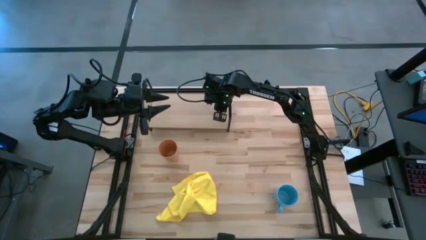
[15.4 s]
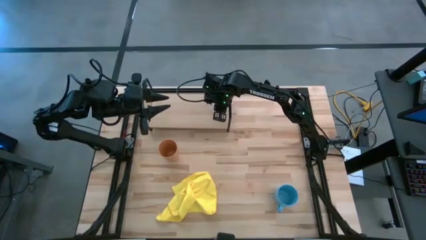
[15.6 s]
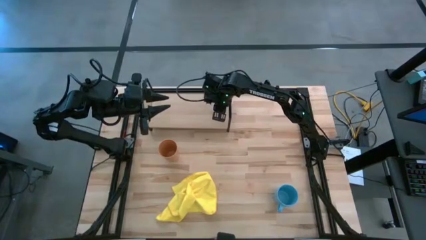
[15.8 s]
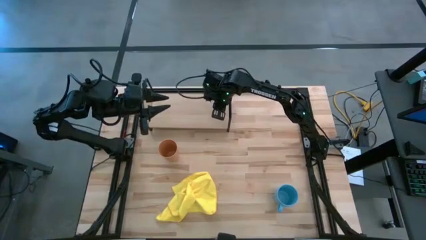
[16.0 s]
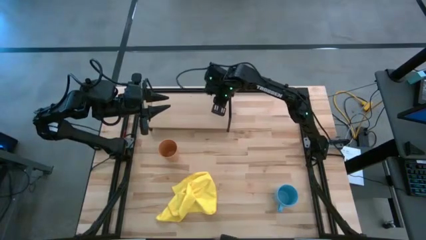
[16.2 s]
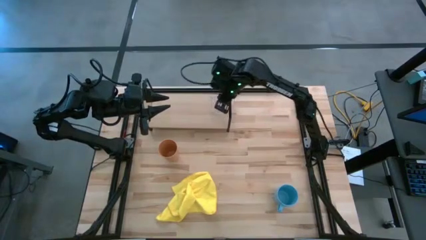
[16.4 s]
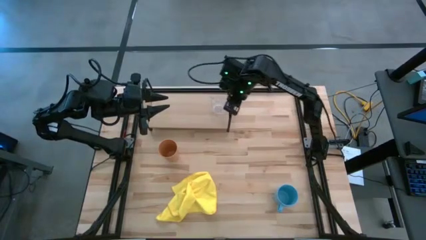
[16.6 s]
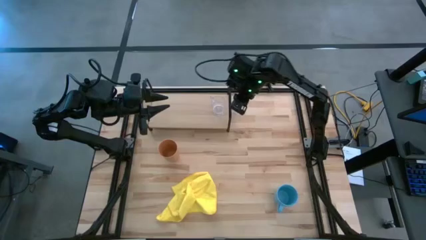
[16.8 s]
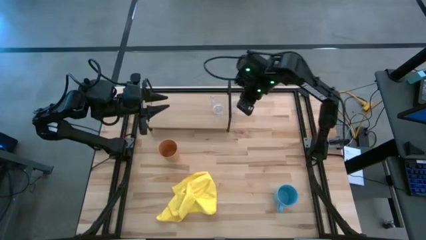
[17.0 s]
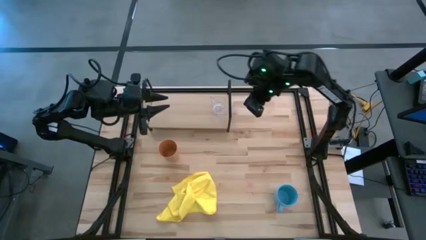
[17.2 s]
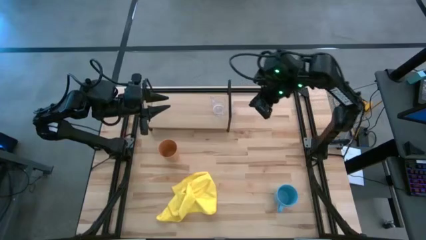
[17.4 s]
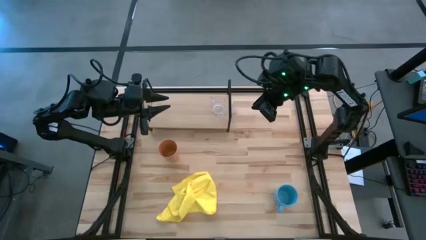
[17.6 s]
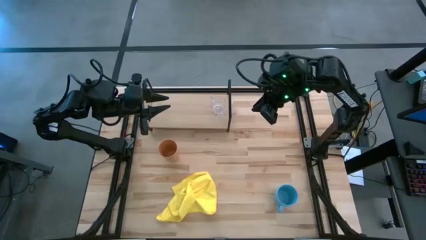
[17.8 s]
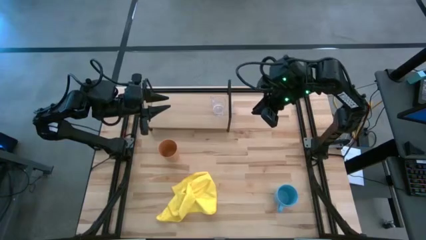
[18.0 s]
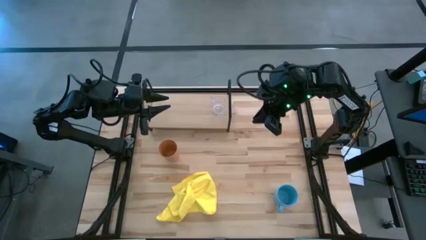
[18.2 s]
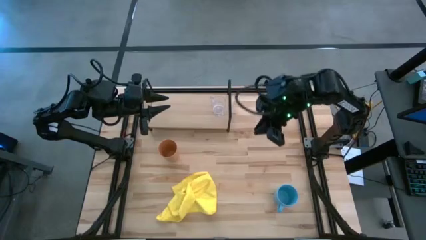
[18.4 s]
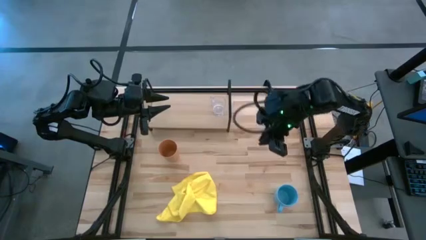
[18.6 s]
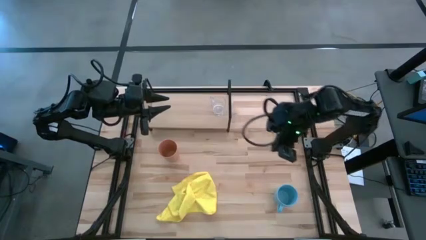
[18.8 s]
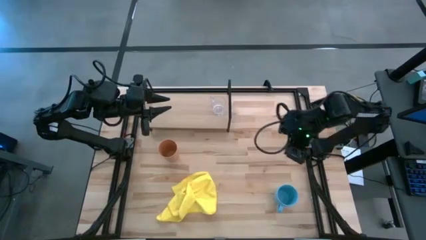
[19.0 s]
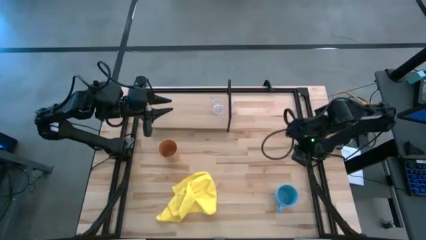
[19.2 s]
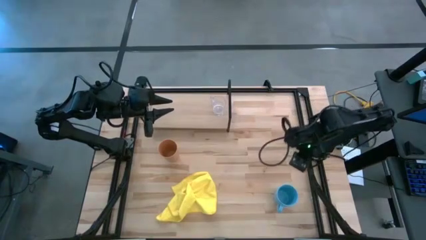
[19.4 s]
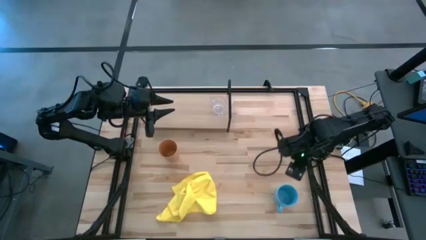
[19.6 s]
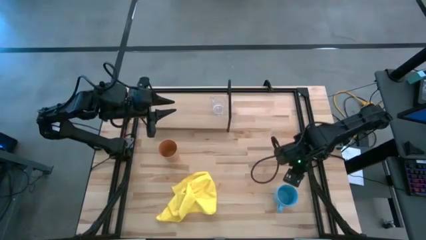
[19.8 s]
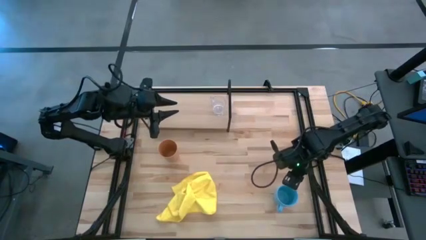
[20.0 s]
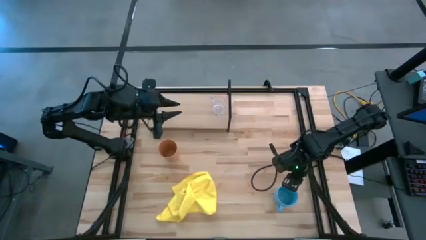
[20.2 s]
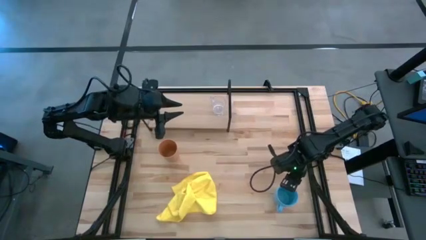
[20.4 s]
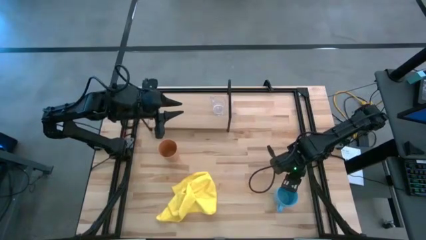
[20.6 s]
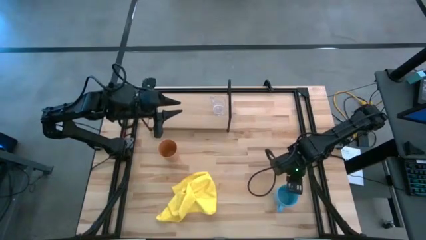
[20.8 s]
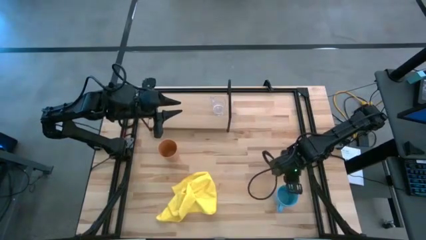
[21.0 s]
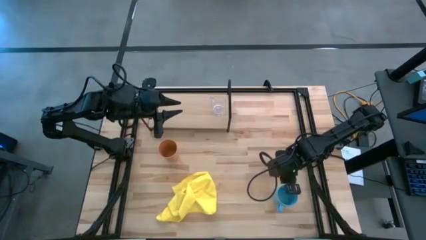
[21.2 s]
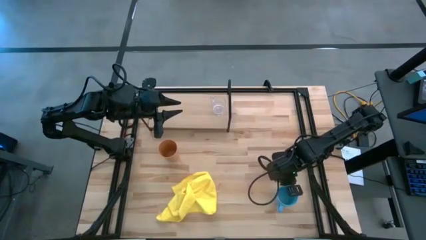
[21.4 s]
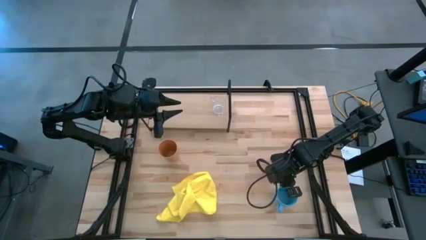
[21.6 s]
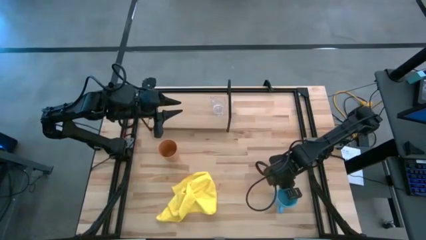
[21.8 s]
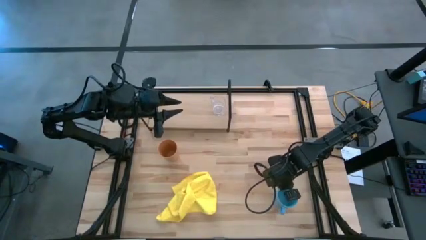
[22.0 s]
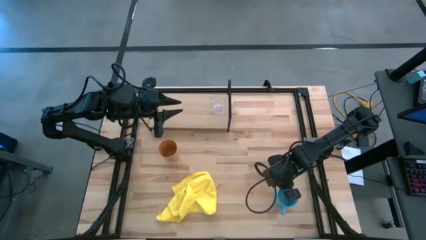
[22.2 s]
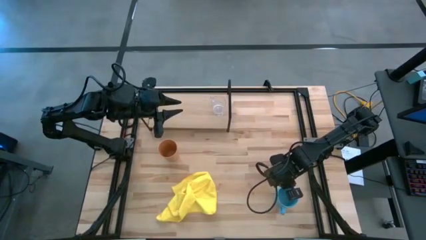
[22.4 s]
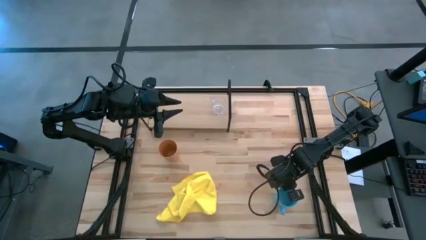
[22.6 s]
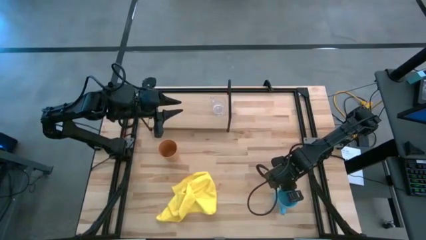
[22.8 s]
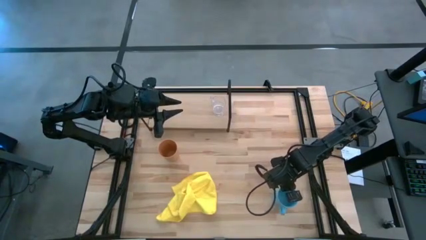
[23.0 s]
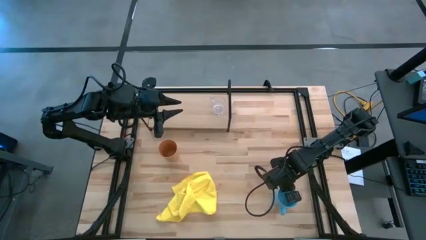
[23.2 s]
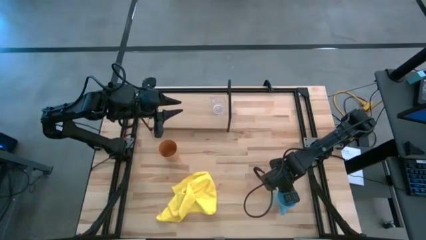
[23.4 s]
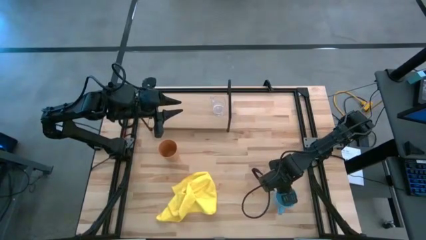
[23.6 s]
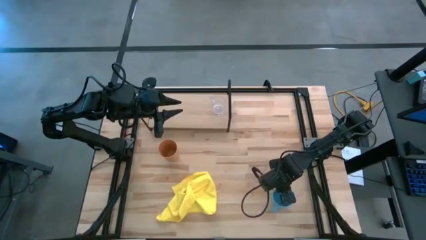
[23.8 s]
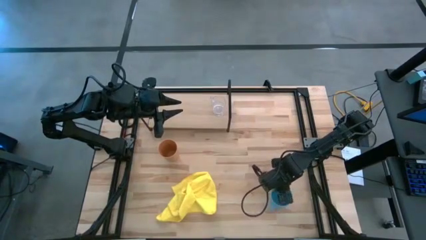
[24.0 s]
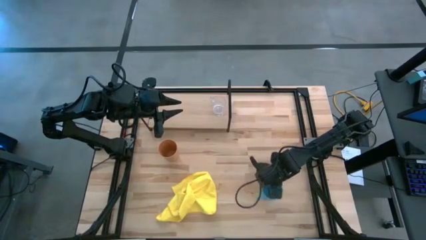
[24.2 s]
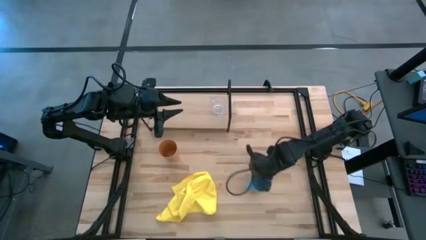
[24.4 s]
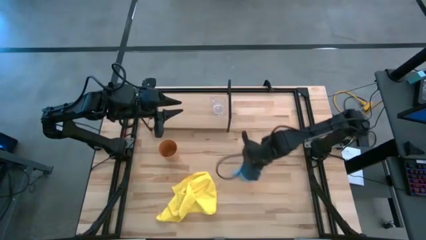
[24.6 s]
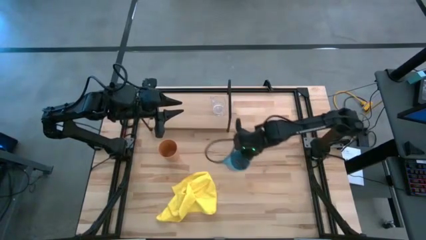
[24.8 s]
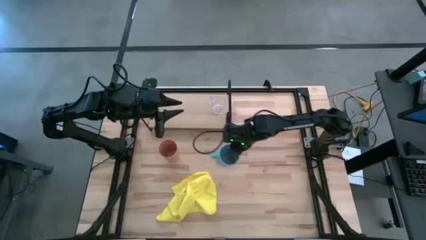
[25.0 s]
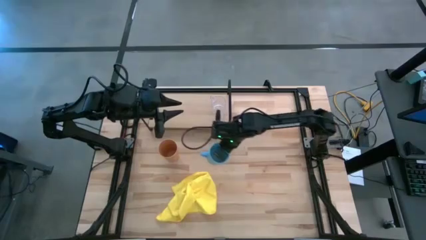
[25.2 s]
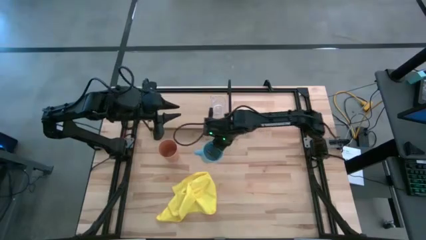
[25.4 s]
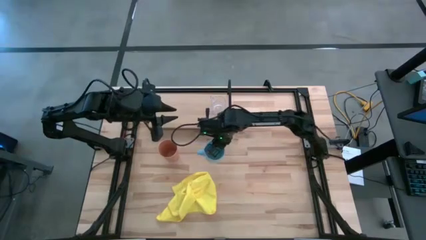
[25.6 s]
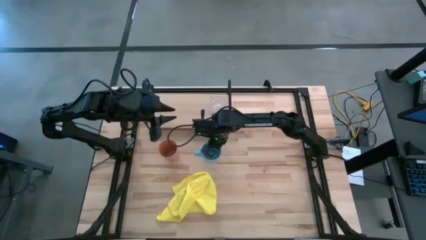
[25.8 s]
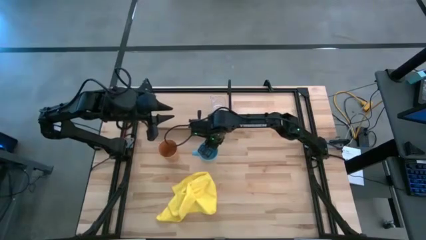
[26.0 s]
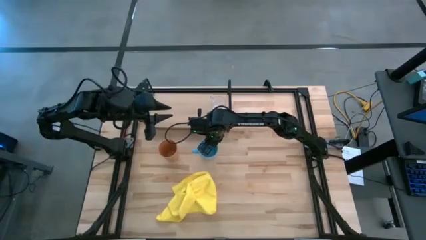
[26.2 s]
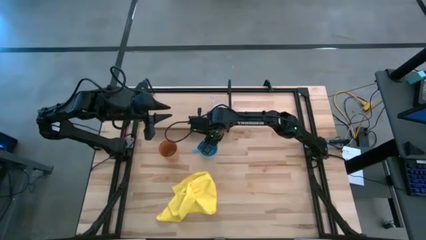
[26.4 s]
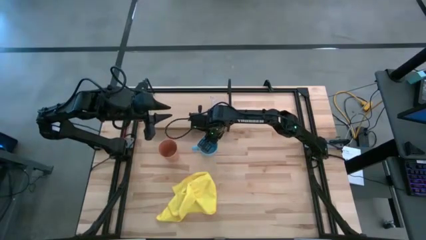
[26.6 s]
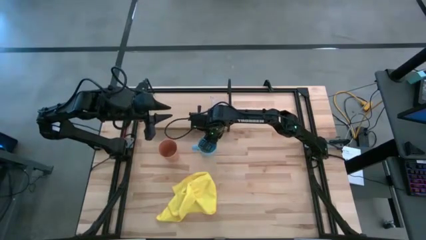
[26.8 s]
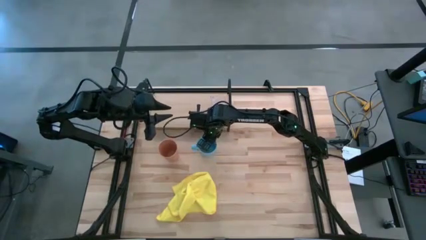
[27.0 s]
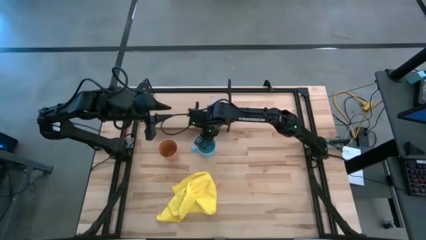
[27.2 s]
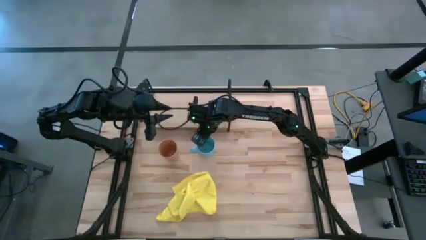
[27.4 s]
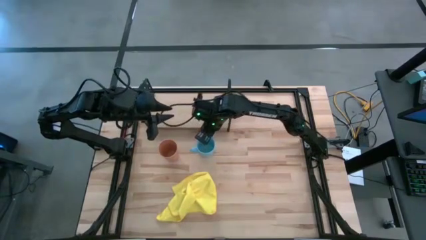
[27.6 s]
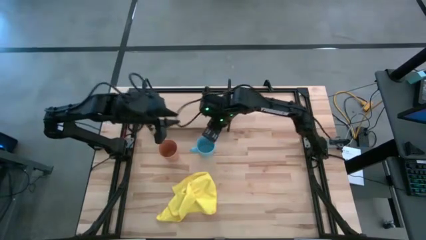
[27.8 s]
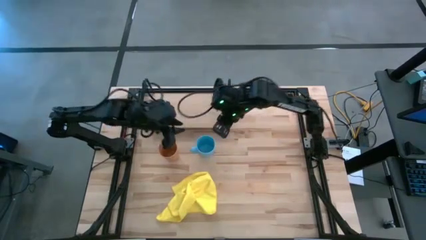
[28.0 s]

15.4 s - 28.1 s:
Task: Stack small to large cups/mugs on shelf
Put the blue mug on the shelf
